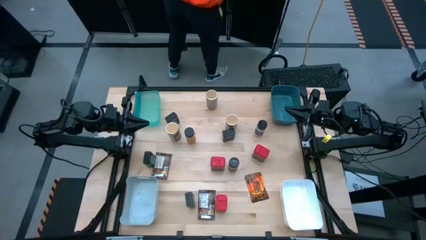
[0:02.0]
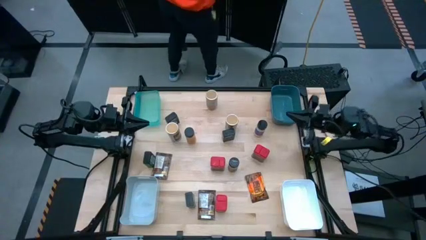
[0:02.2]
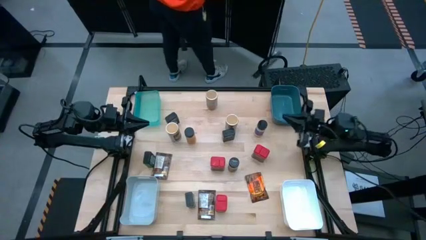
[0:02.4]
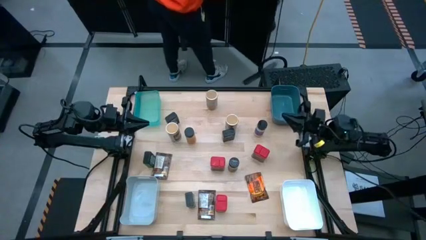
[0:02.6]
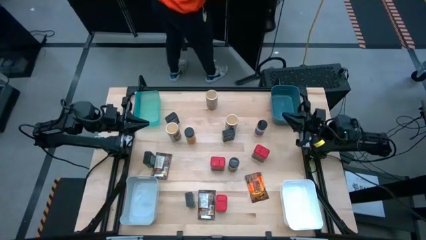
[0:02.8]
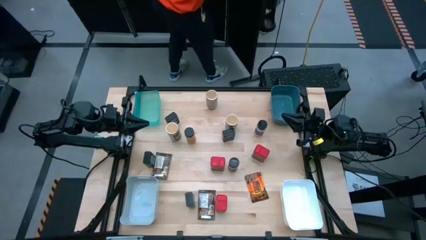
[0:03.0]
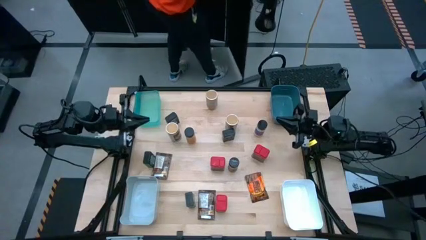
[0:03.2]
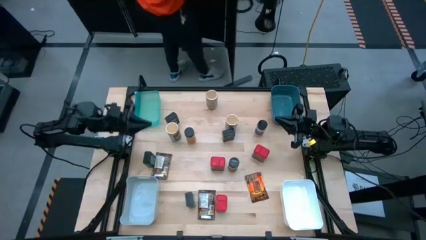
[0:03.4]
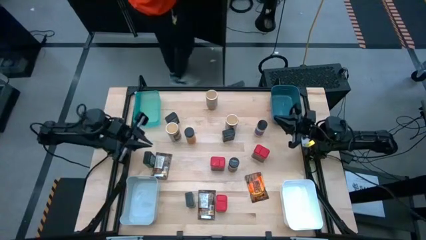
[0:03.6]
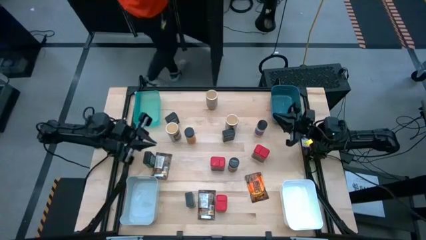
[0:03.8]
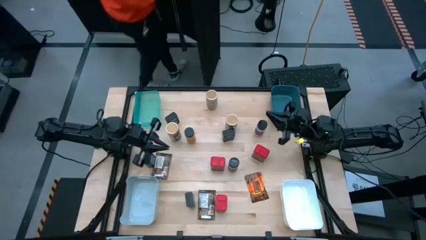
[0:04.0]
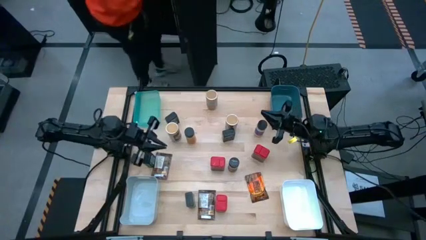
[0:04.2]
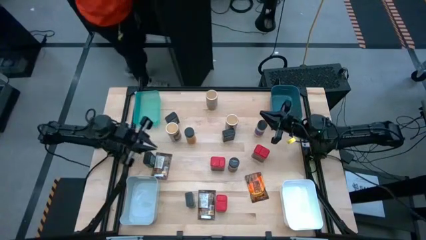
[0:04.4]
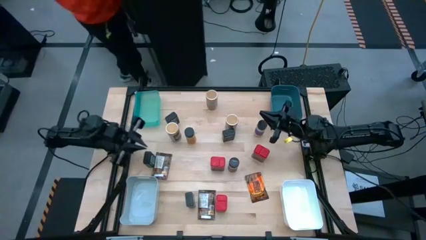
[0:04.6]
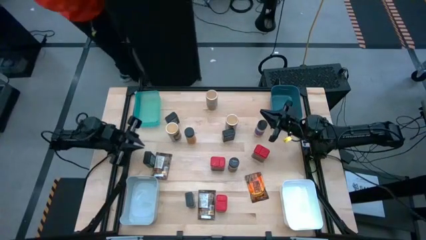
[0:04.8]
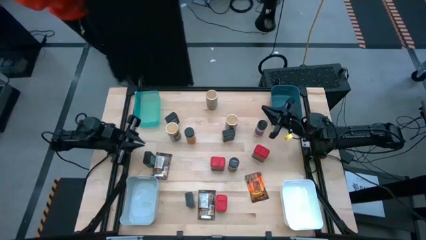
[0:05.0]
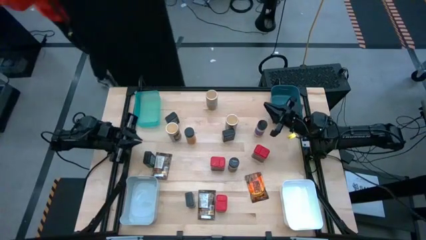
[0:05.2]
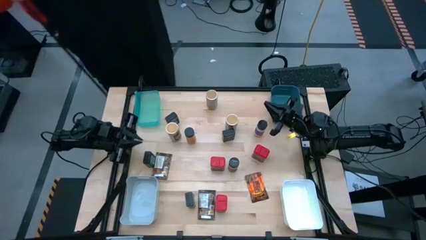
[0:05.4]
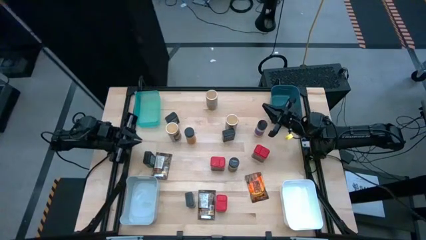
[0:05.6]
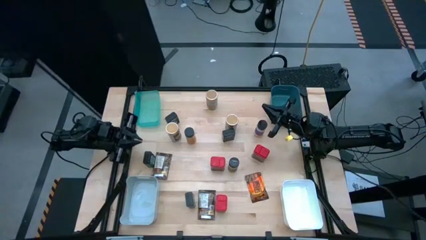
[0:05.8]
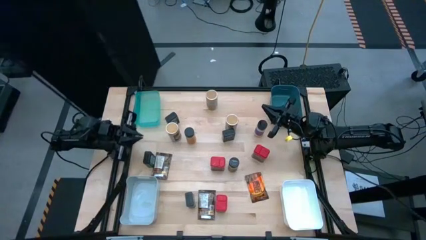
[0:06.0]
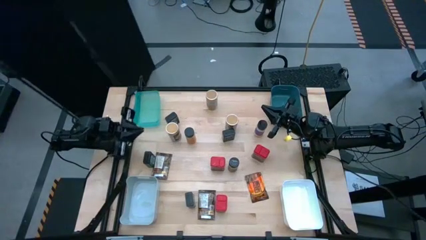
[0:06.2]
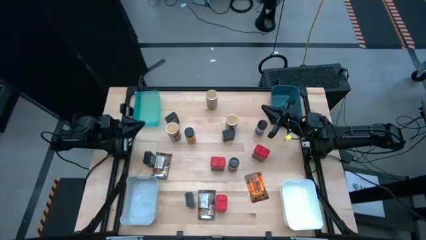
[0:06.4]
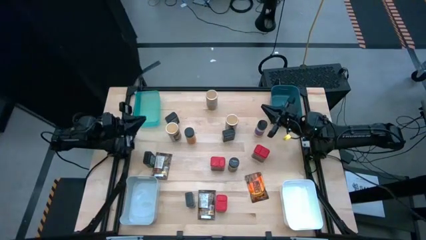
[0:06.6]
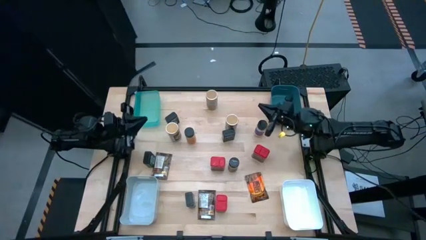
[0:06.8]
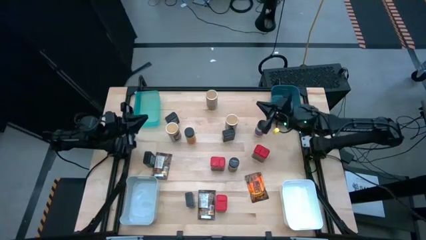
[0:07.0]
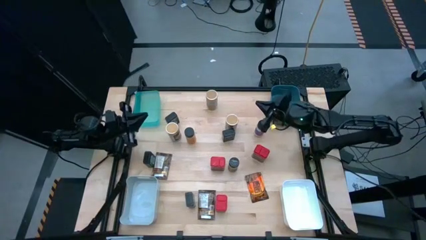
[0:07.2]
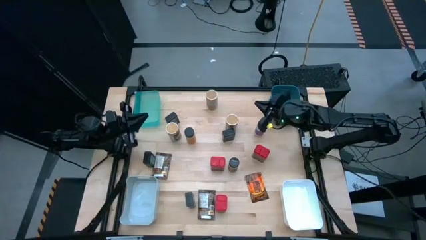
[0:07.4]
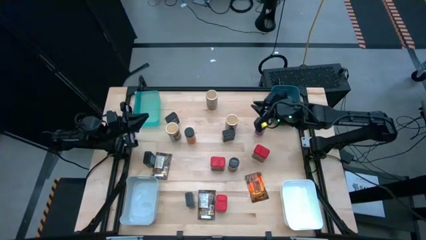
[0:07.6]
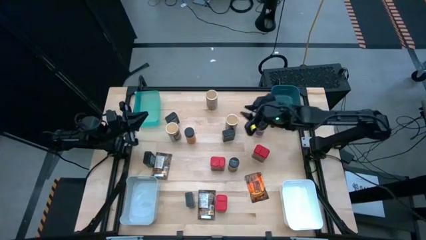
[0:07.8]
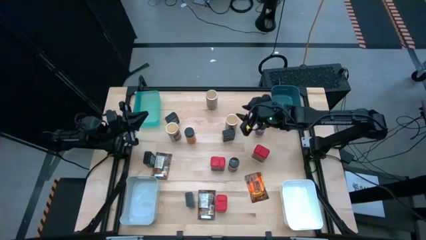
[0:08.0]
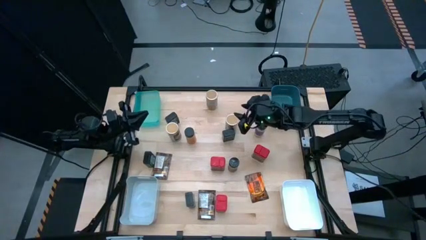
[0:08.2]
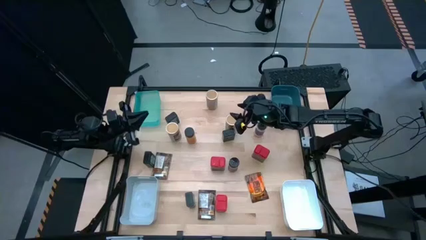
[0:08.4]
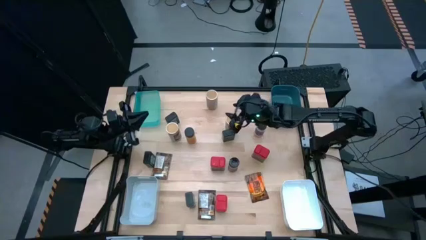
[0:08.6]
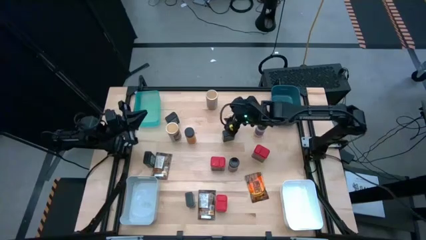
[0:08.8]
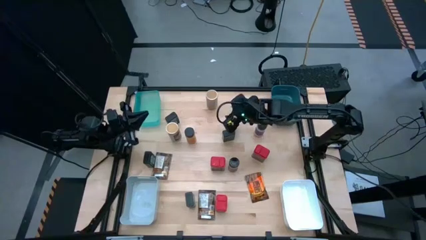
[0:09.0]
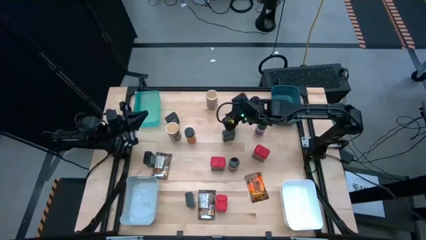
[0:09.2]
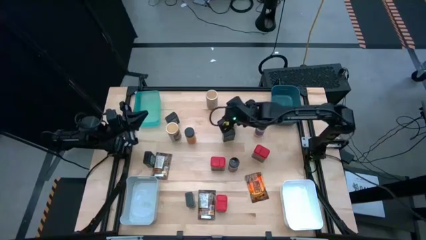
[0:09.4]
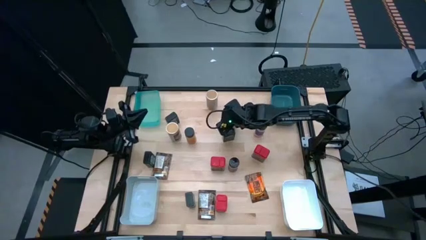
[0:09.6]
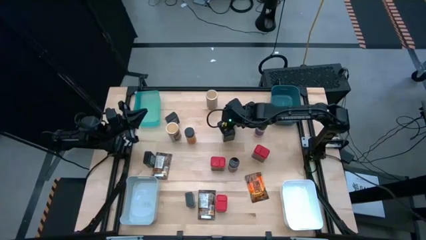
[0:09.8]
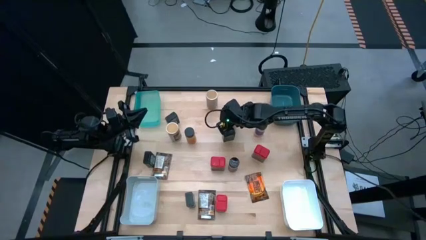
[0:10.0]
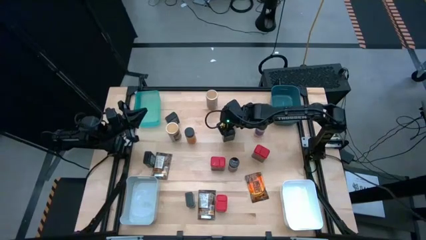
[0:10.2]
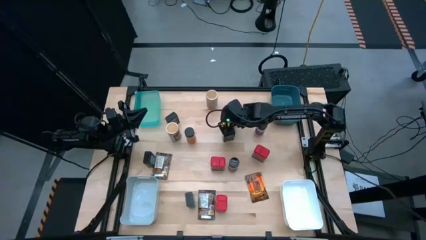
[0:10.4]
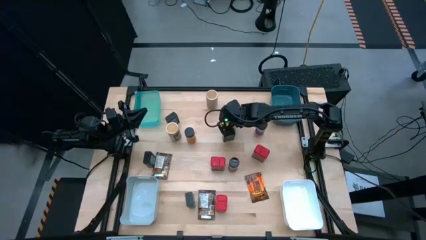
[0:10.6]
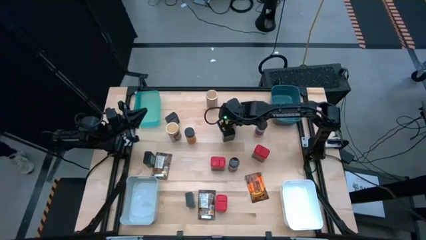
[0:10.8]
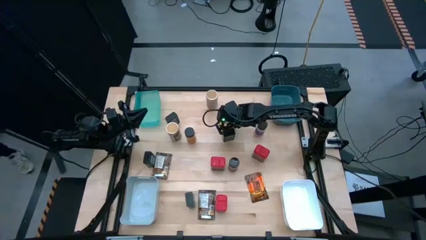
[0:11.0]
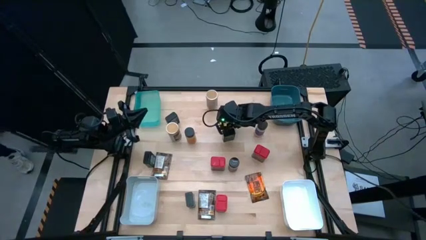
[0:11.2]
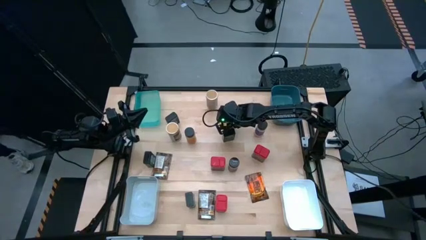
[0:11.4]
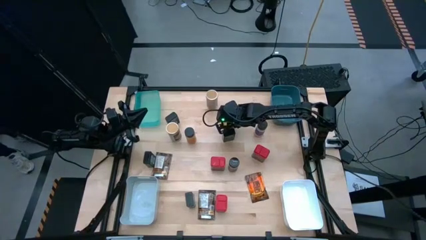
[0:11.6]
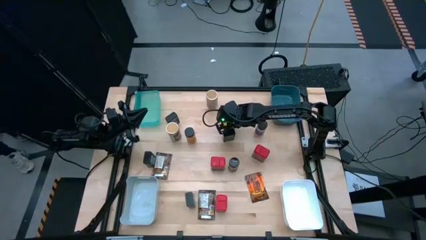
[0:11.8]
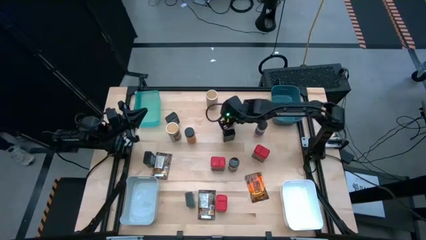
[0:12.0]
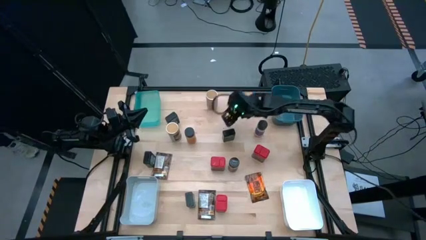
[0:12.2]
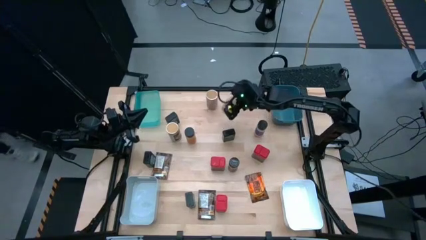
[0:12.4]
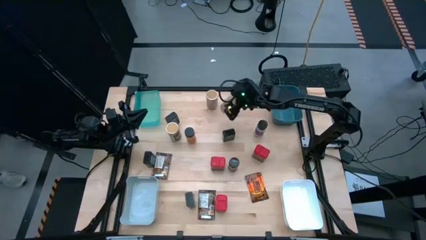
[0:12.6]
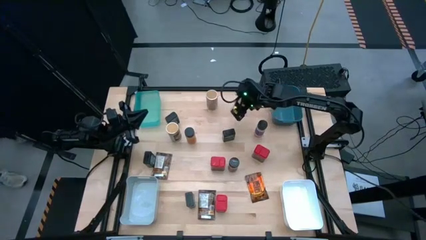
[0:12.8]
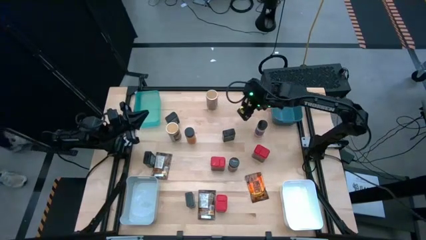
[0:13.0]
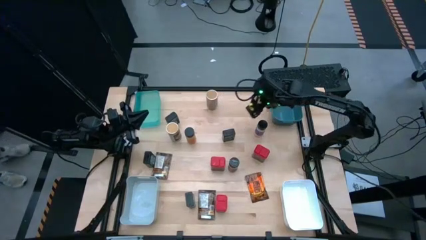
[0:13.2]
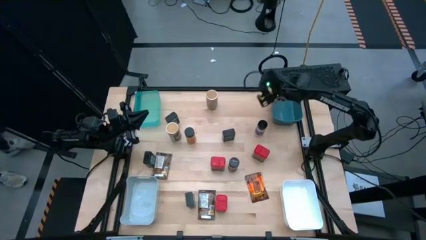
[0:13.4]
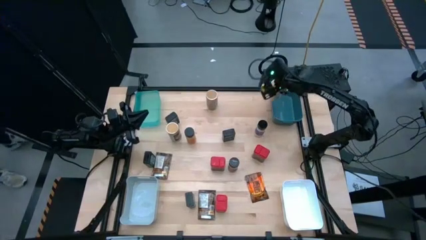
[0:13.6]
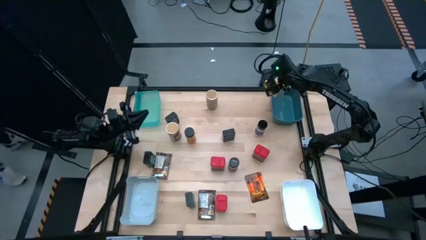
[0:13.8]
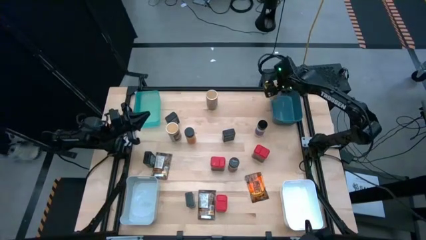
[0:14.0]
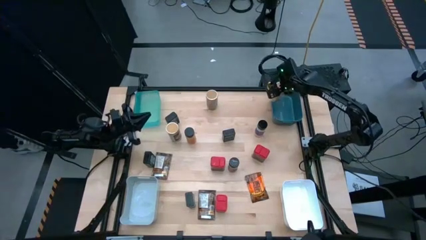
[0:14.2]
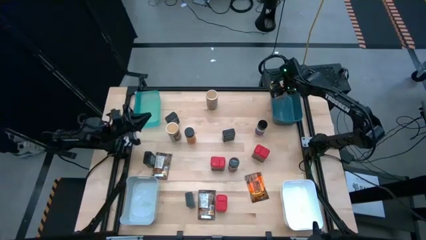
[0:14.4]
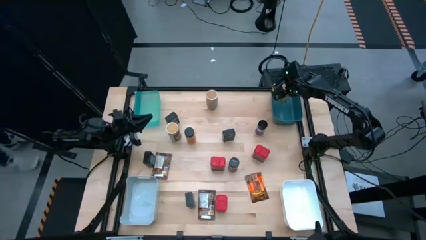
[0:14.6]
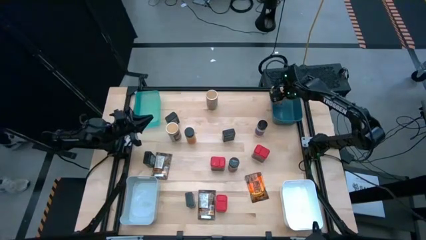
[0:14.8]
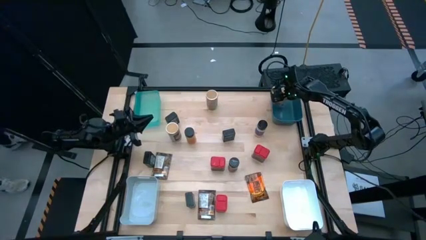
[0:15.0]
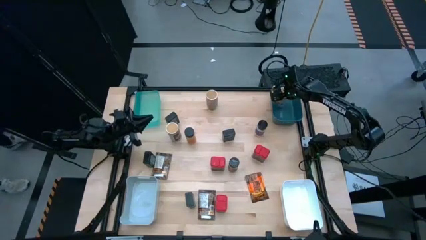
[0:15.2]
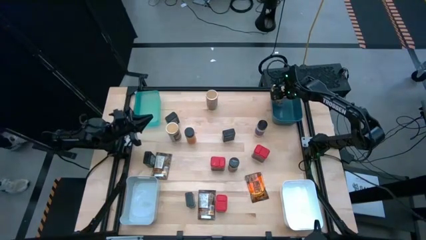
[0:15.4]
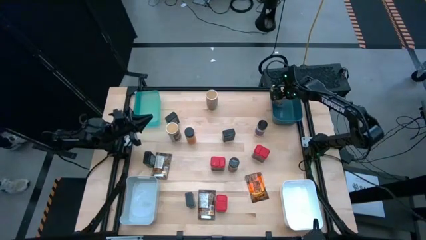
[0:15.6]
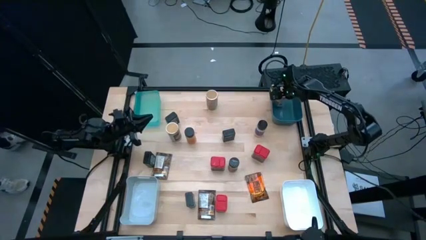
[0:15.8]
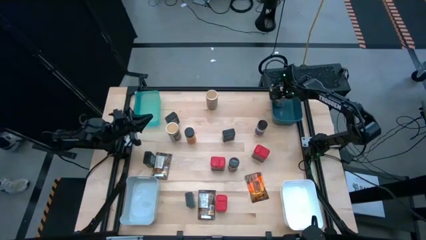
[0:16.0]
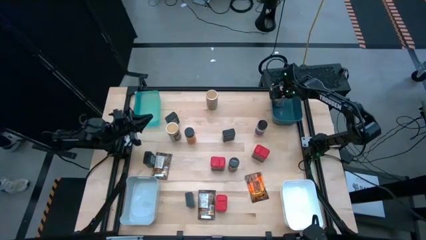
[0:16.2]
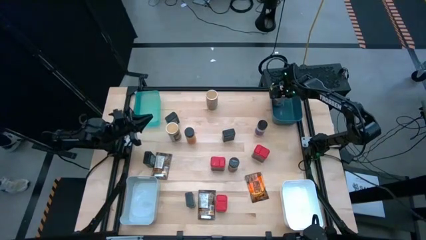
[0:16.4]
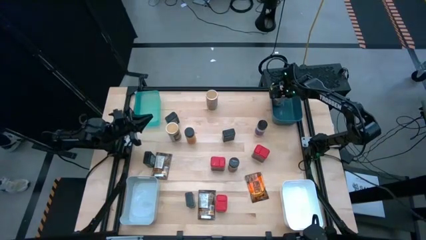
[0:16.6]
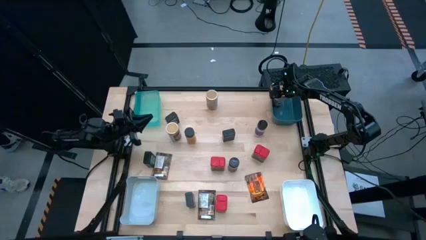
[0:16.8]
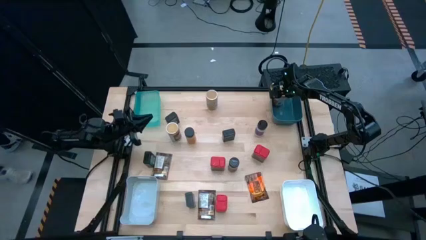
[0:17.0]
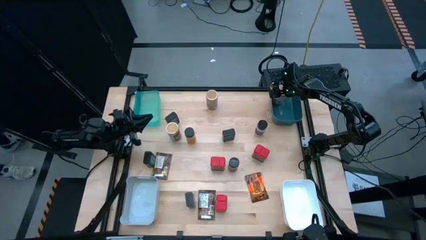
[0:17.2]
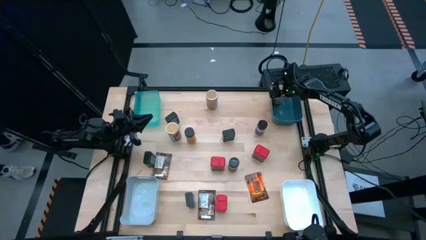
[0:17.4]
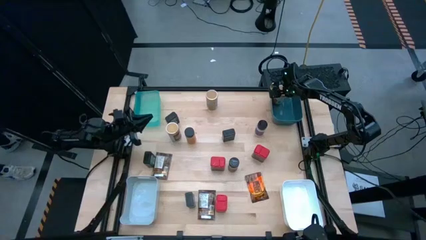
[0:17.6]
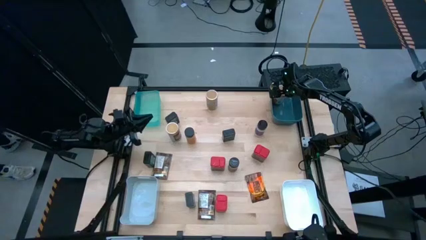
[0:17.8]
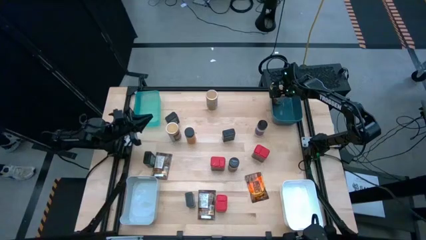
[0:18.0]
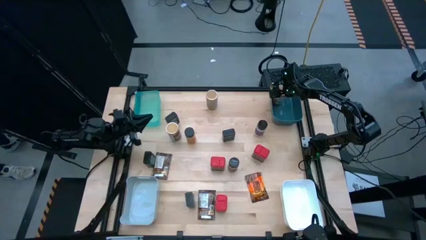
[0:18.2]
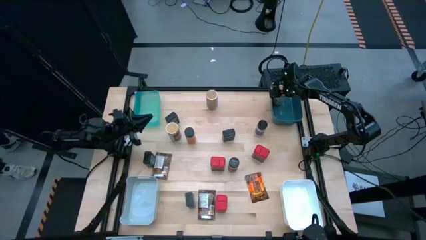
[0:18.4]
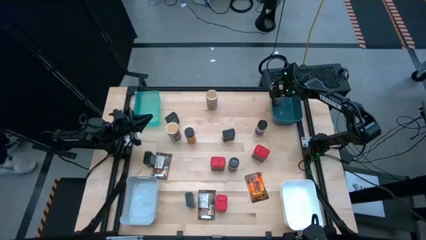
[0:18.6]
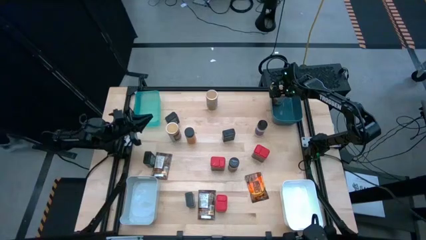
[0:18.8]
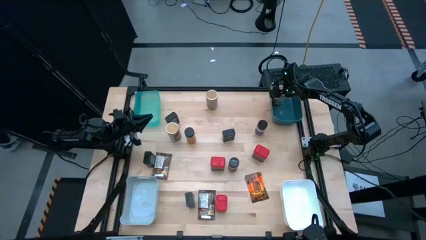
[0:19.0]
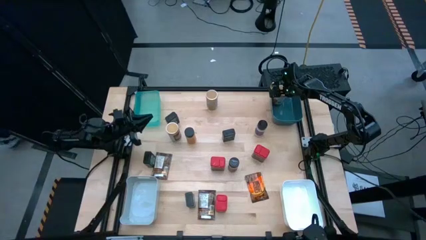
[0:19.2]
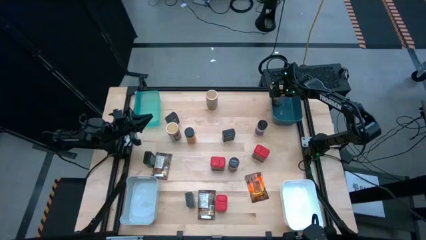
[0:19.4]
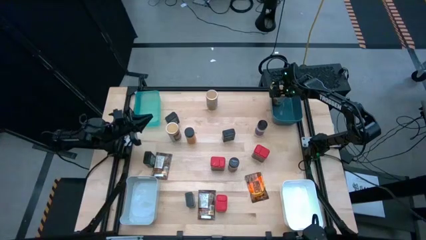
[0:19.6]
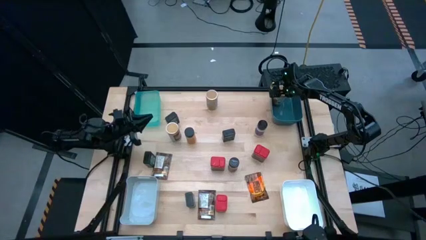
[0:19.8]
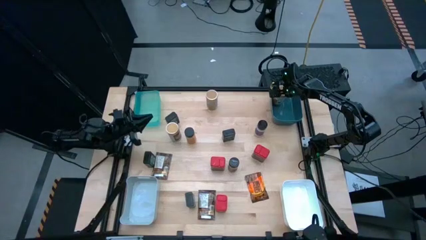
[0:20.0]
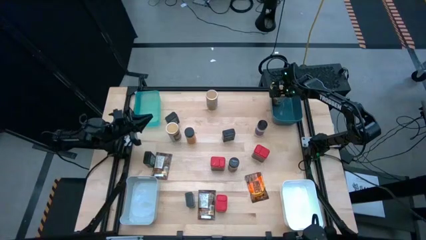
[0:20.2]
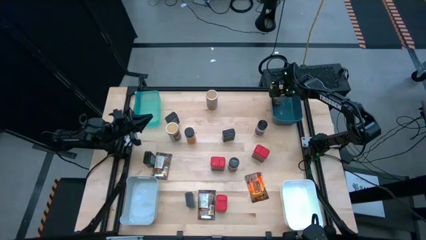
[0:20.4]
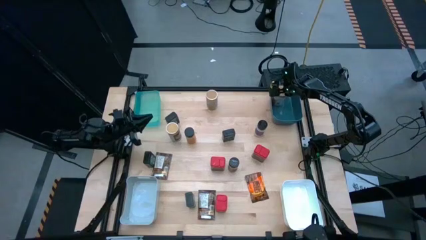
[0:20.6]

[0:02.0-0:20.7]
Task: Sort spices by type
Put the bottom right brown seasoning bottle into the dark green bin
